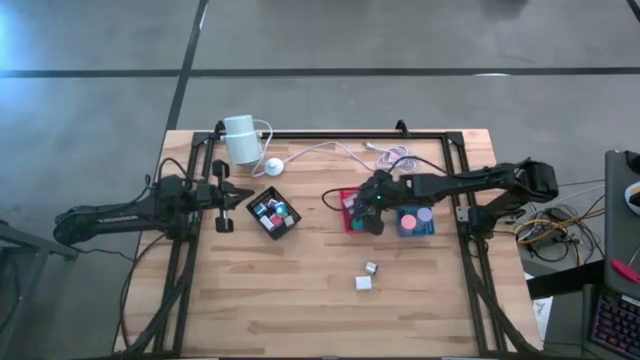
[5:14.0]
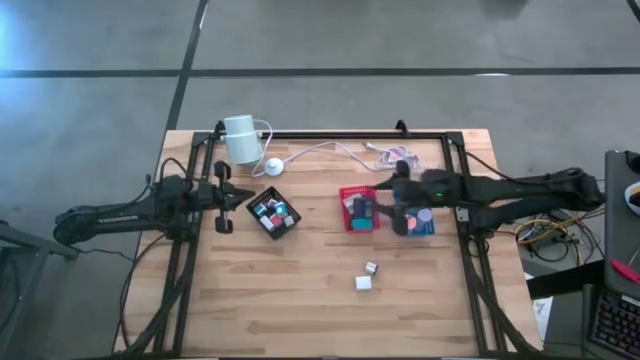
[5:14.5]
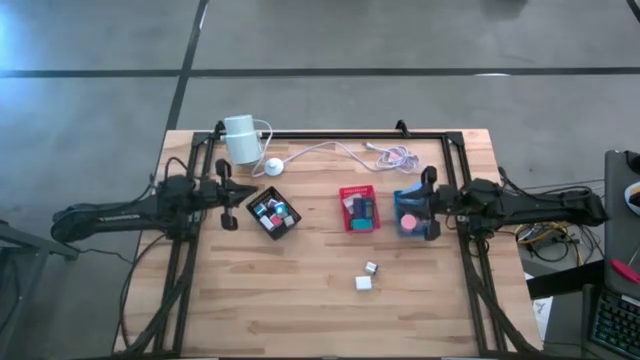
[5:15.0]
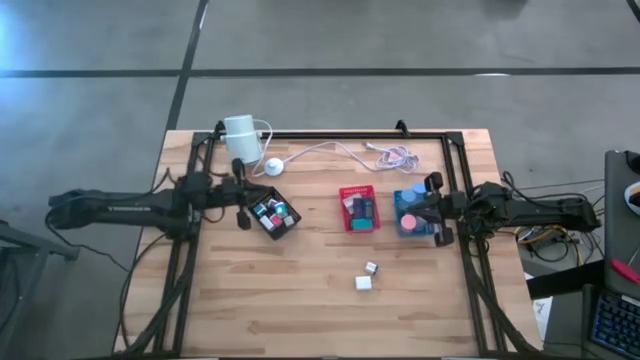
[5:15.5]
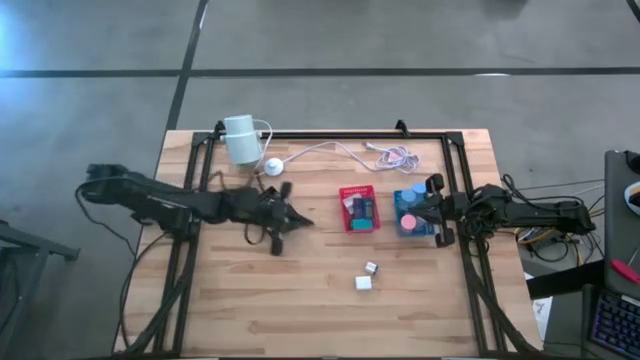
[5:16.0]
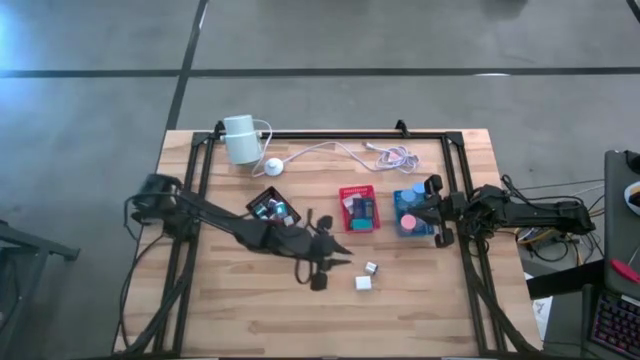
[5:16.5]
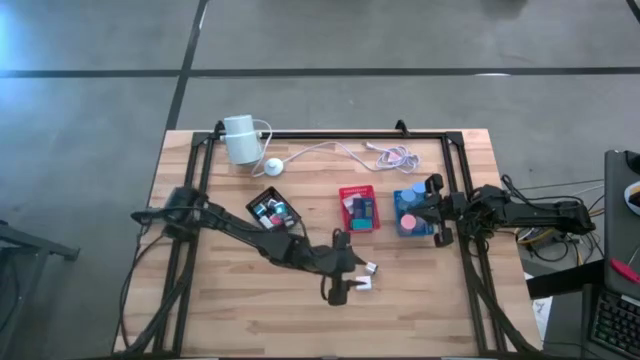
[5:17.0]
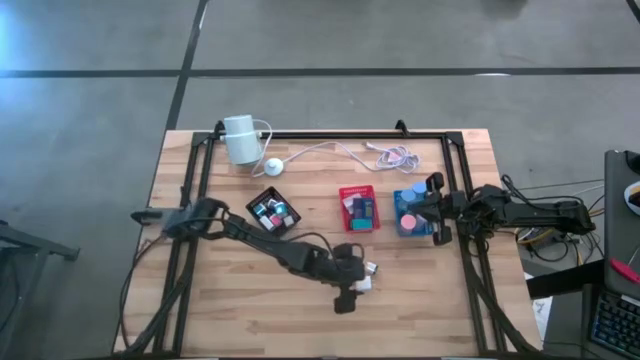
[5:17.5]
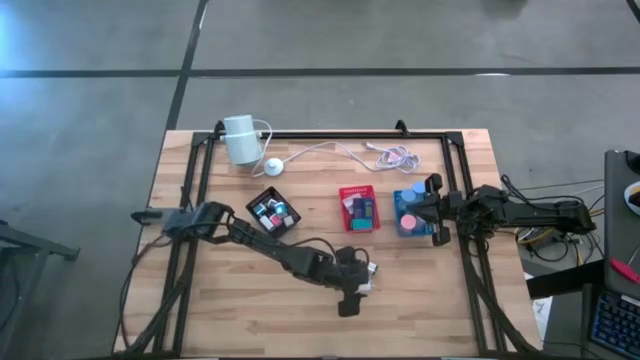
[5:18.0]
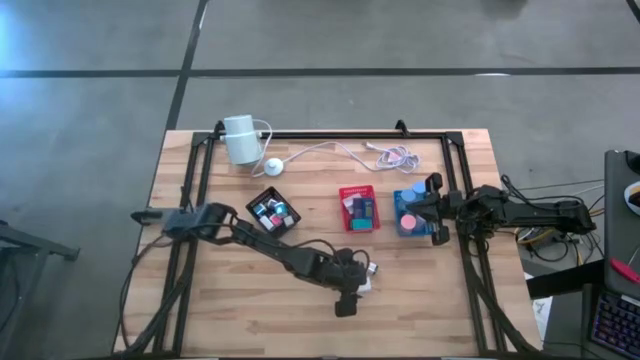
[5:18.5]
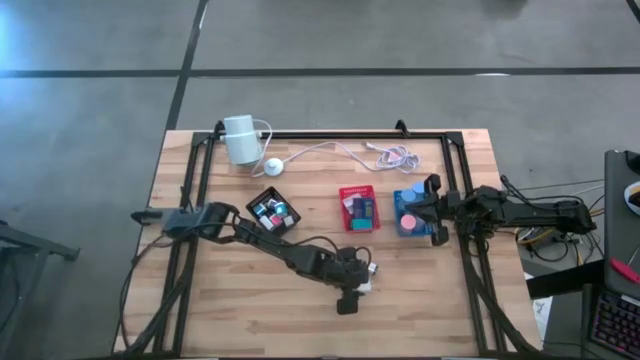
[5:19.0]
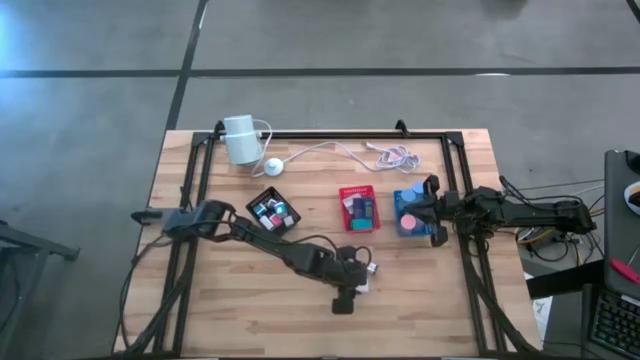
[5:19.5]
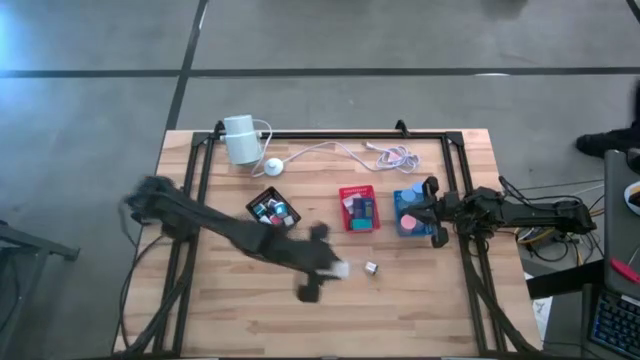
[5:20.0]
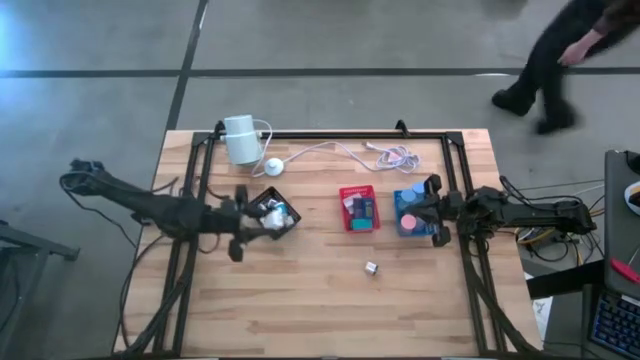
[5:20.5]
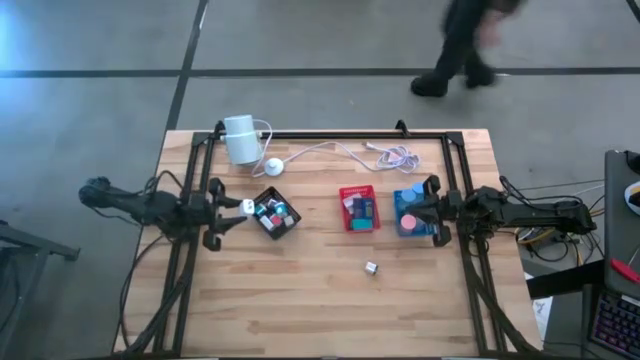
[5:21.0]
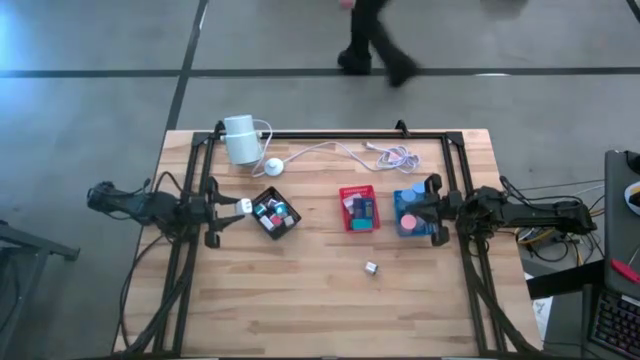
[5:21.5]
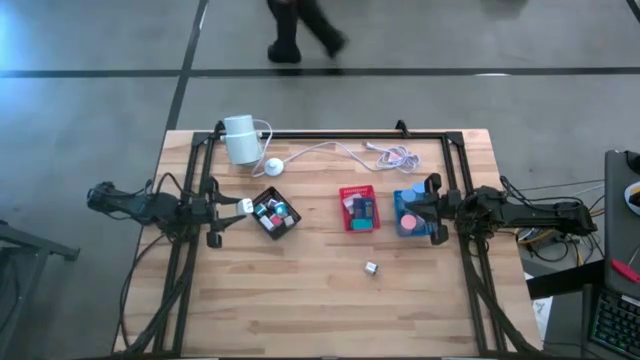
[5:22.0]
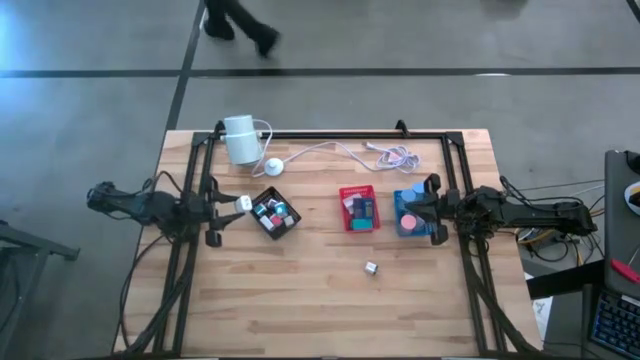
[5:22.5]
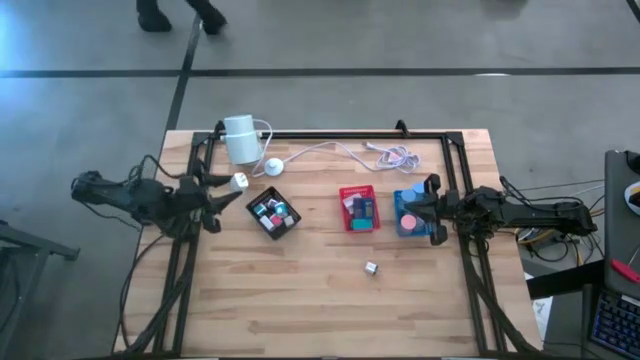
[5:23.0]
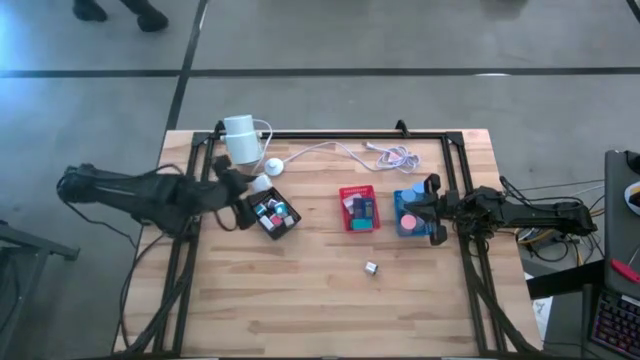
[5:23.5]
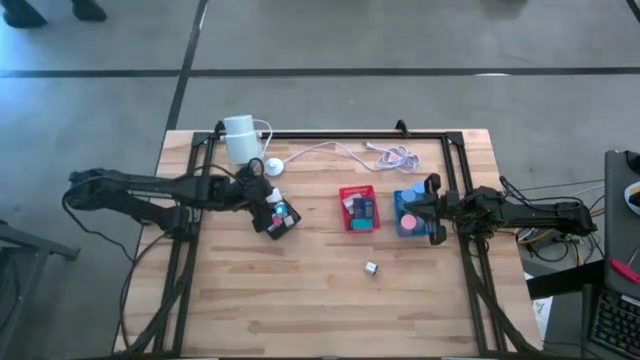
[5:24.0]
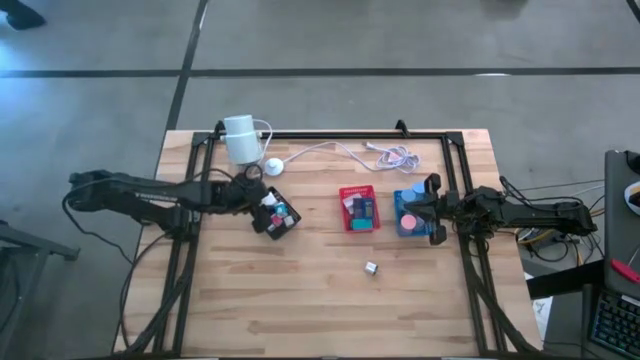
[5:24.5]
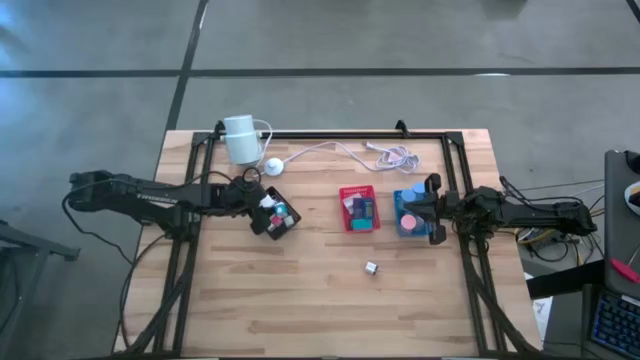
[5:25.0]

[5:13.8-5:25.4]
Task: Pick & Place Office items
Put the white charger adaptor into the black bin

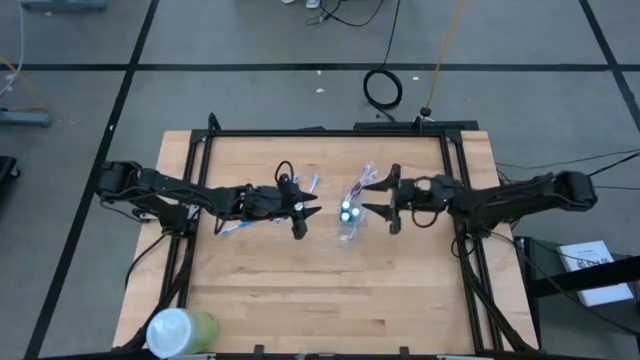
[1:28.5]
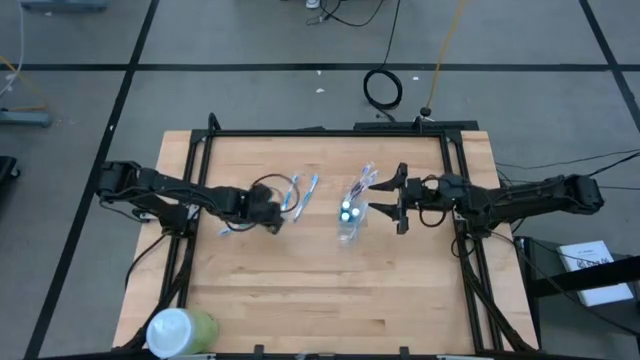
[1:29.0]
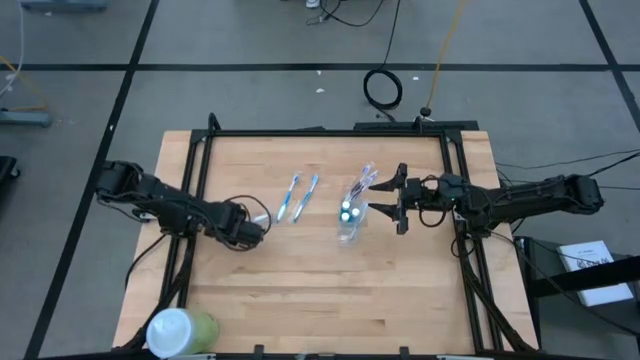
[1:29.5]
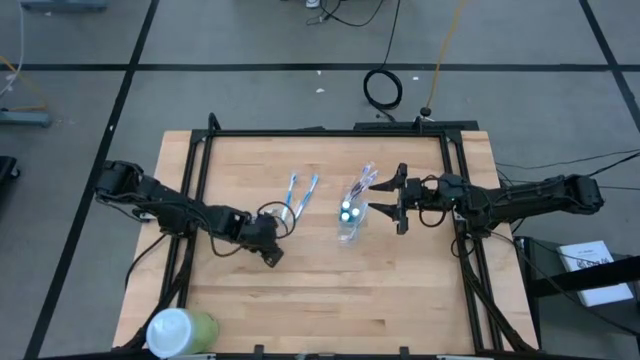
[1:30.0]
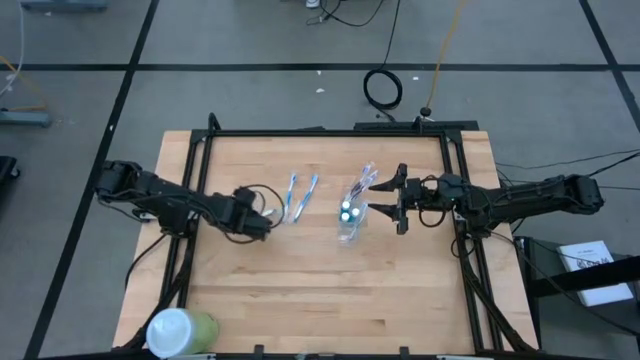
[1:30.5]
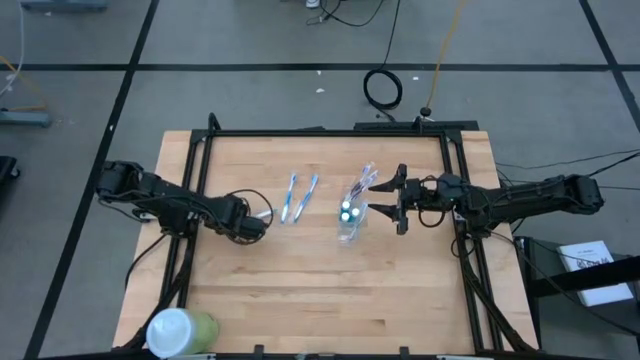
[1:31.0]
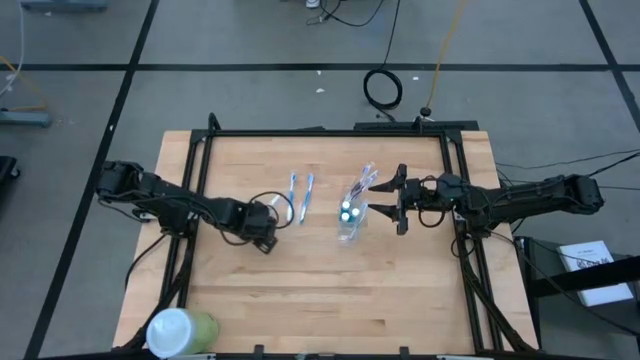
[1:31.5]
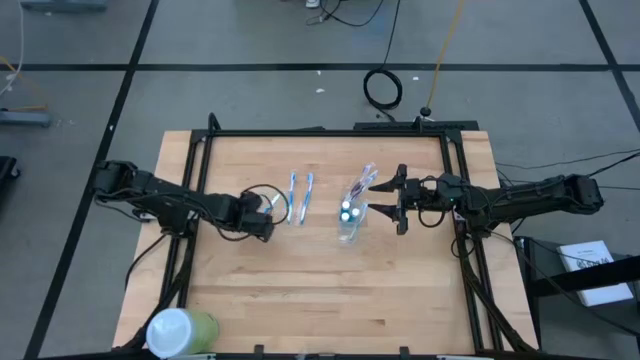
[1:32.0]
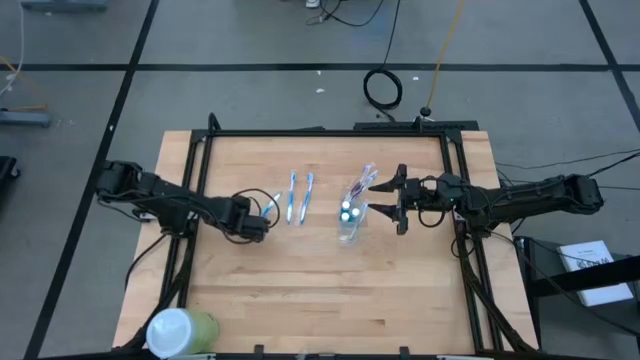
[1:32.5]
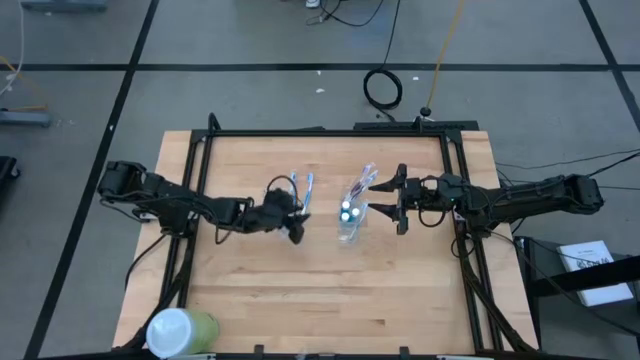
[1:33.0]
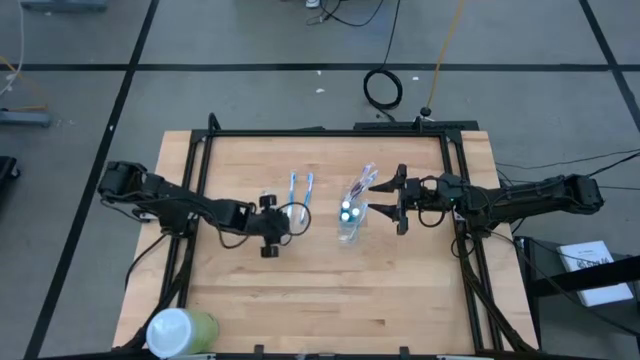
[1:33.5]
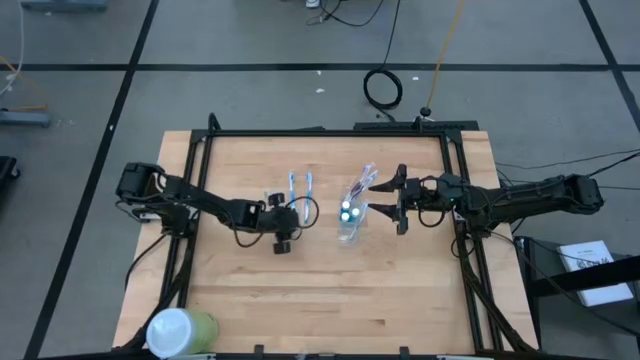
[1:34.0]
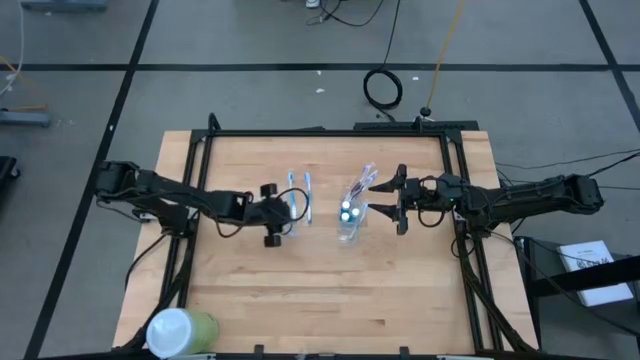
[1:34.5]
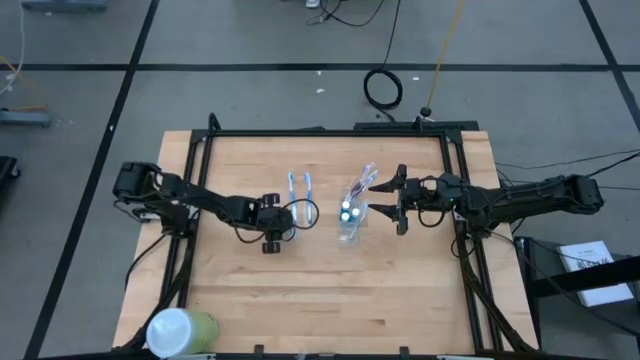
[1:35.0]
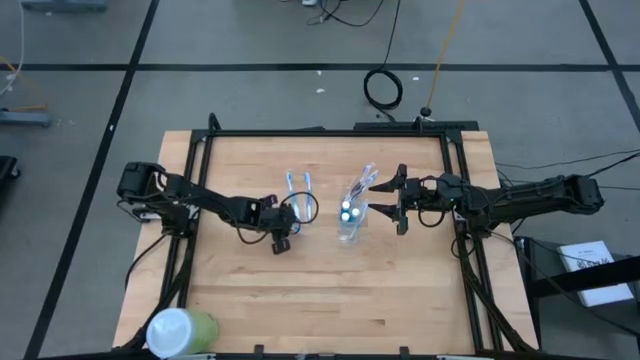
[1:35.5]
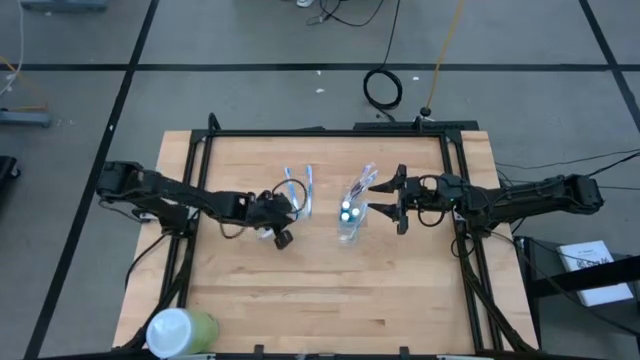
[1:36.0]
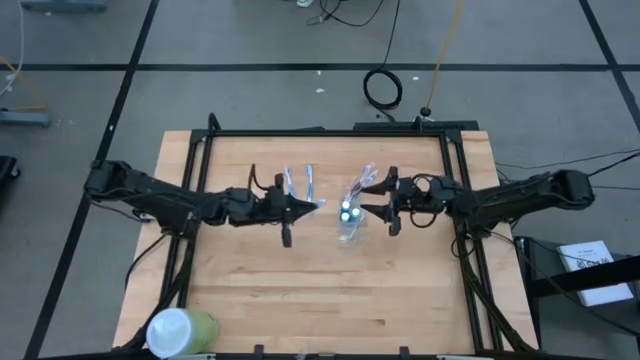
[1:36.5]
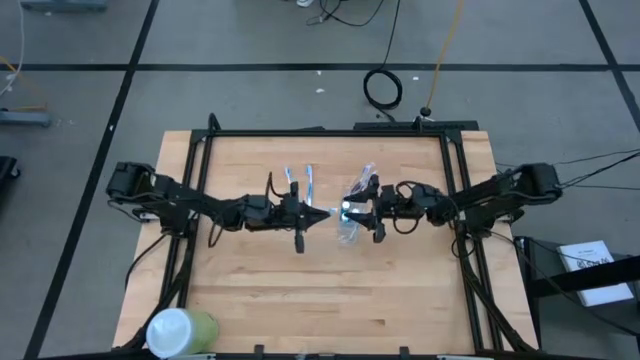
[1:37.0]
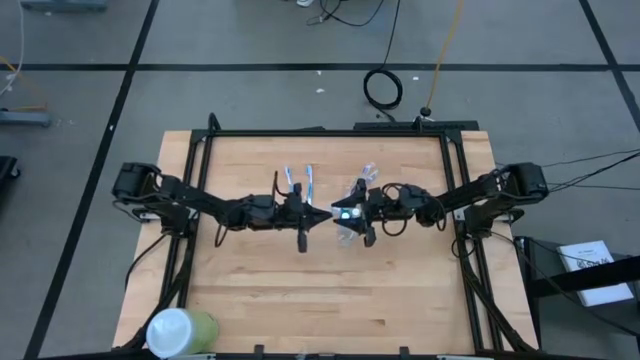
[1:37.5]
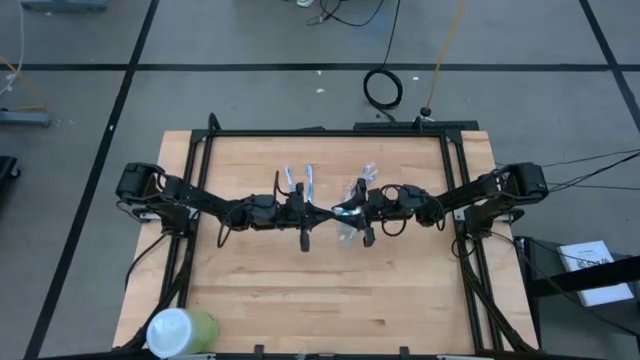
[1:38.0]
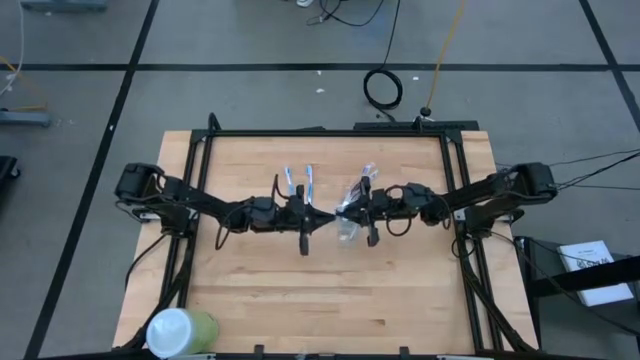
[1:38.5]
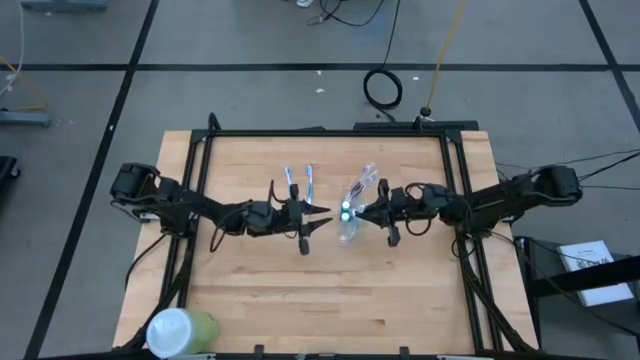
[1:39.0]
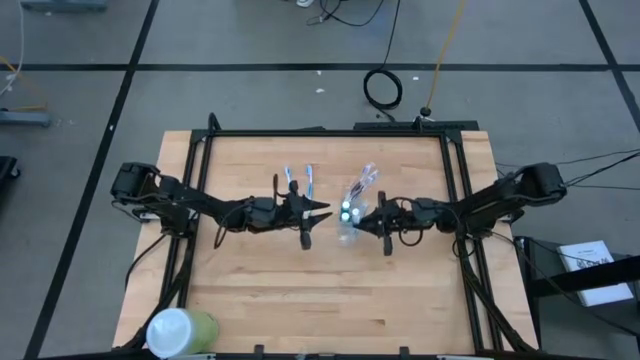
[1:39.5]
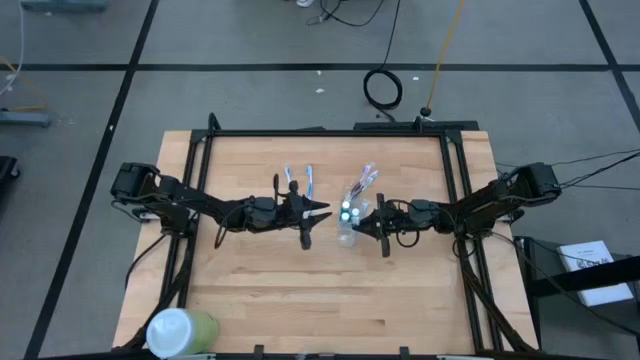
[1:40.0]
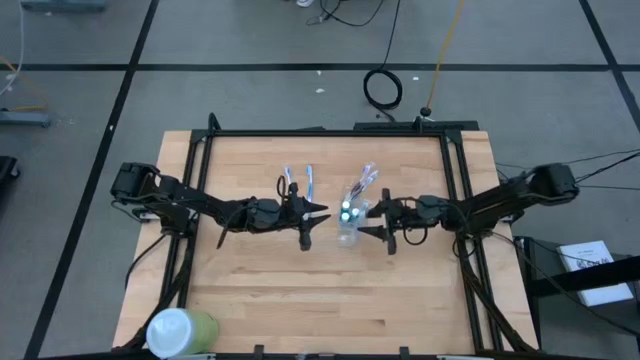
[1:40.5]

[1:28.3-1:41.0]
Task: Pick & Place toothbrushing station
Put the blue toothbrush into the transparent organizer
